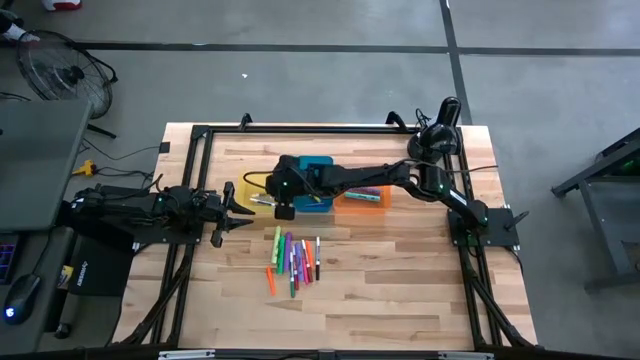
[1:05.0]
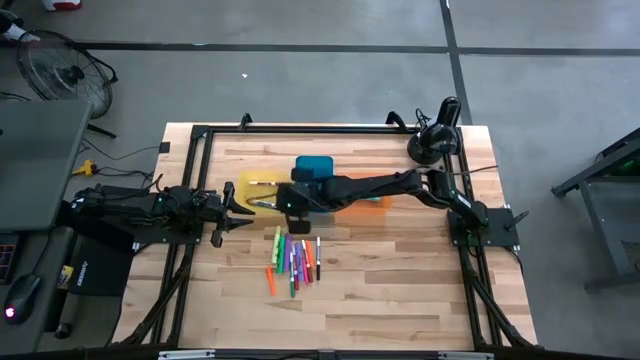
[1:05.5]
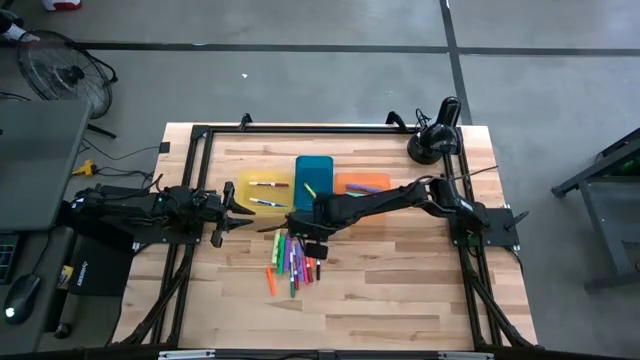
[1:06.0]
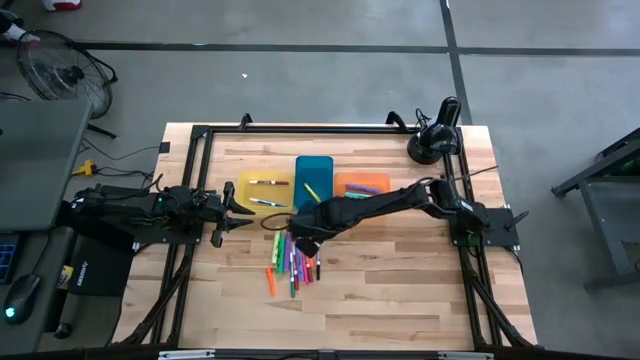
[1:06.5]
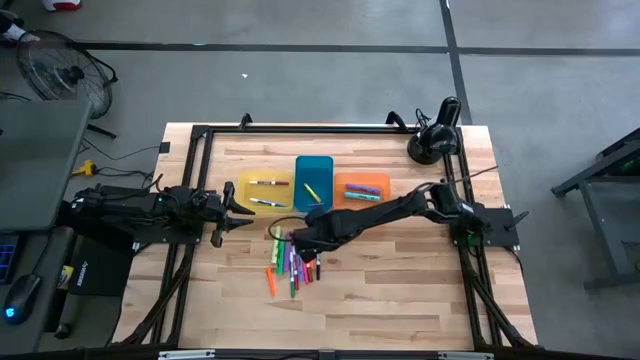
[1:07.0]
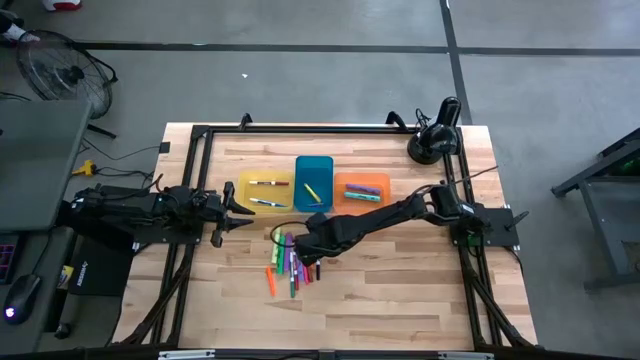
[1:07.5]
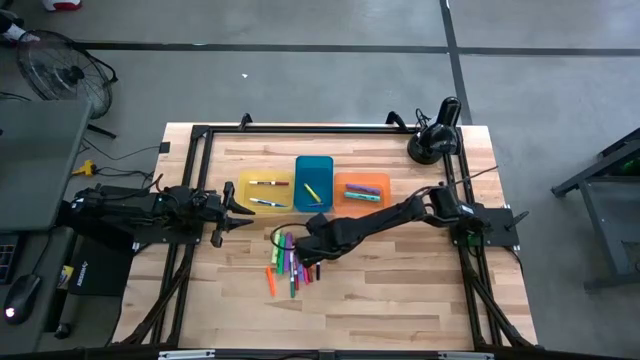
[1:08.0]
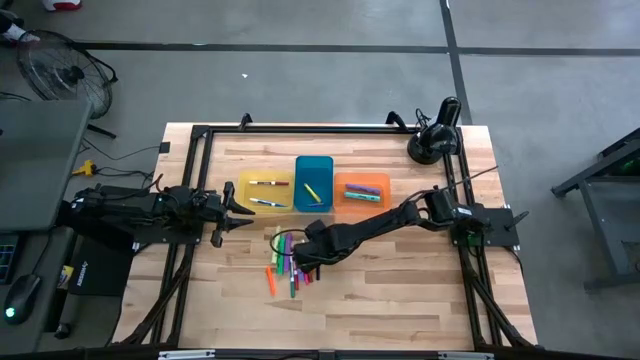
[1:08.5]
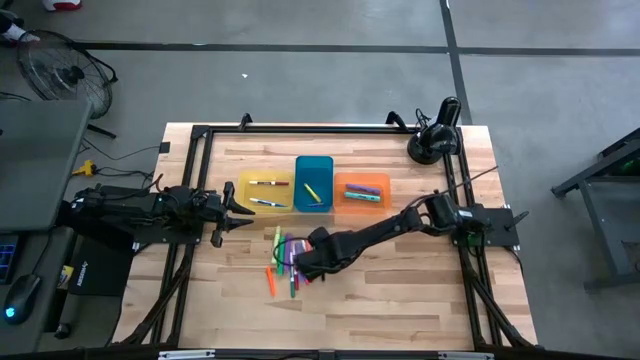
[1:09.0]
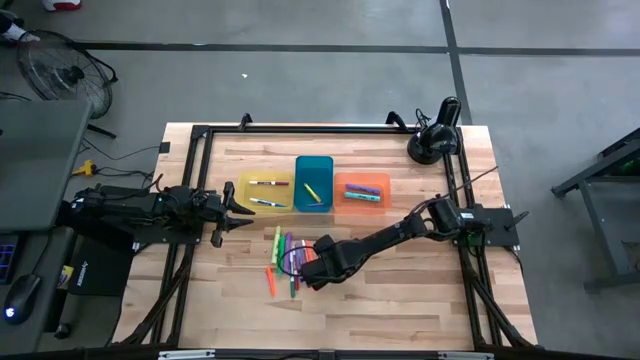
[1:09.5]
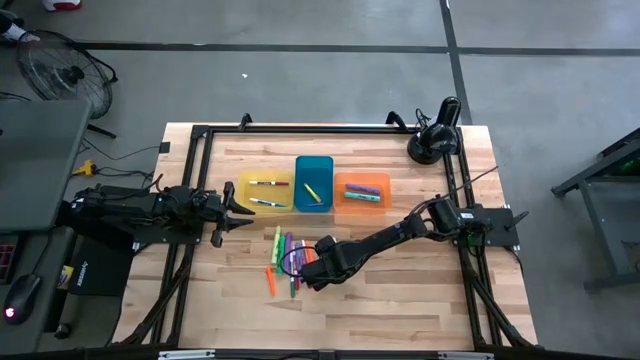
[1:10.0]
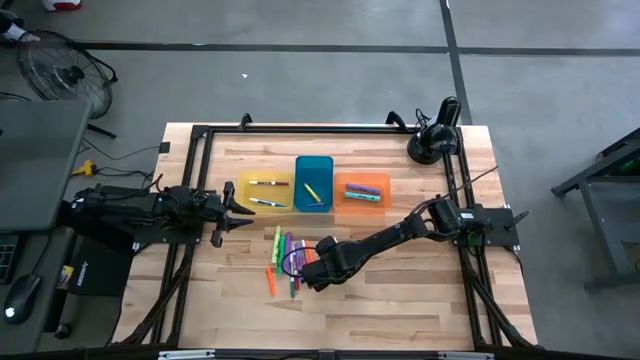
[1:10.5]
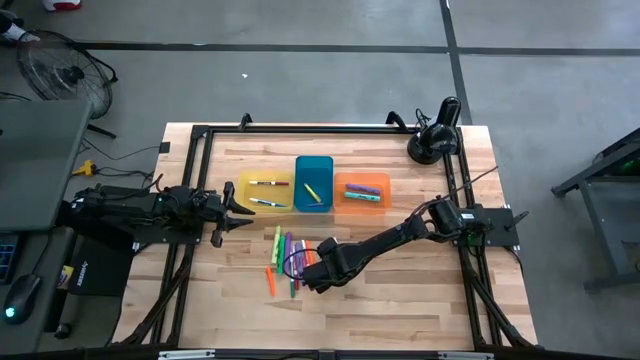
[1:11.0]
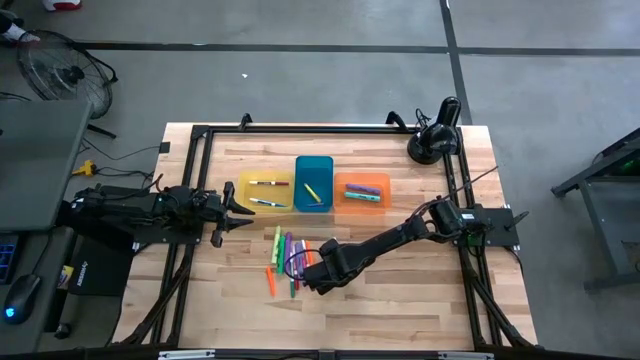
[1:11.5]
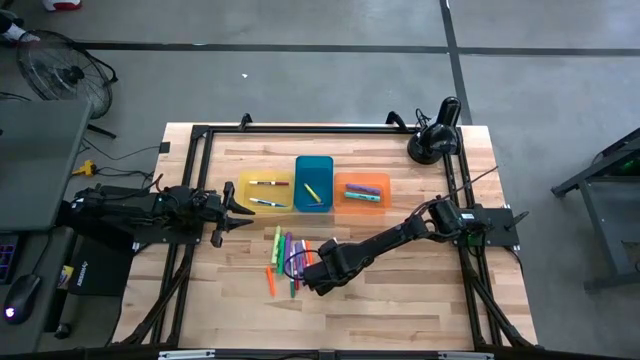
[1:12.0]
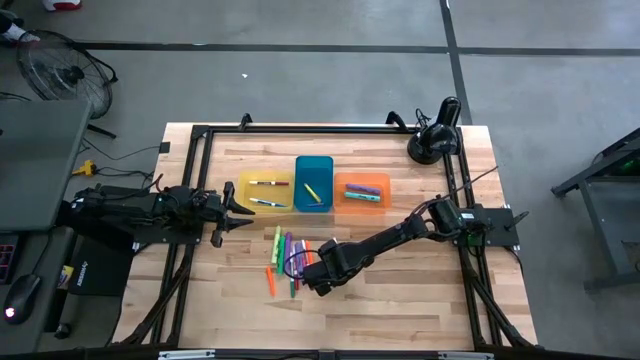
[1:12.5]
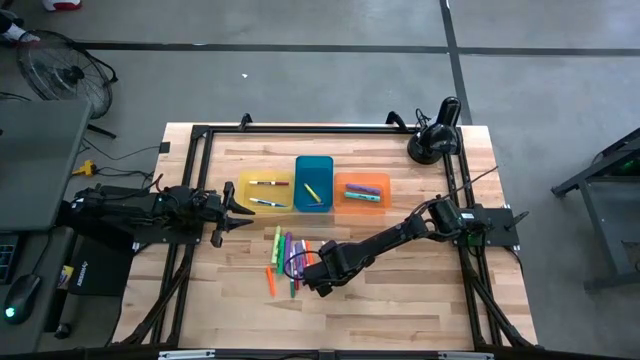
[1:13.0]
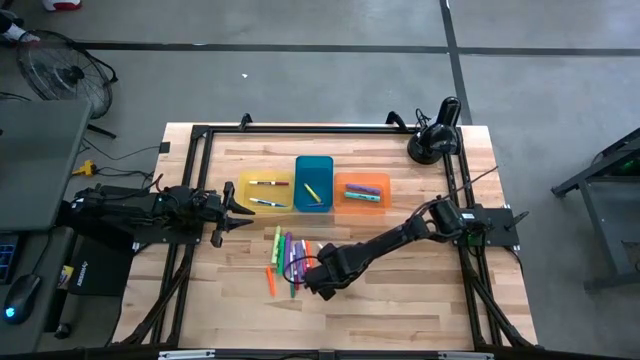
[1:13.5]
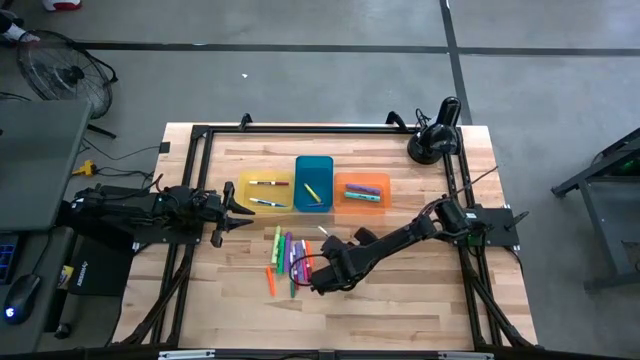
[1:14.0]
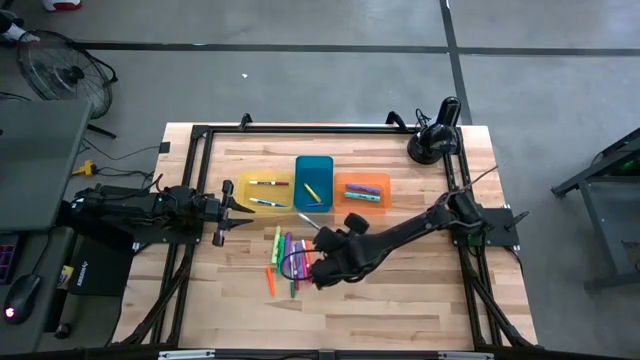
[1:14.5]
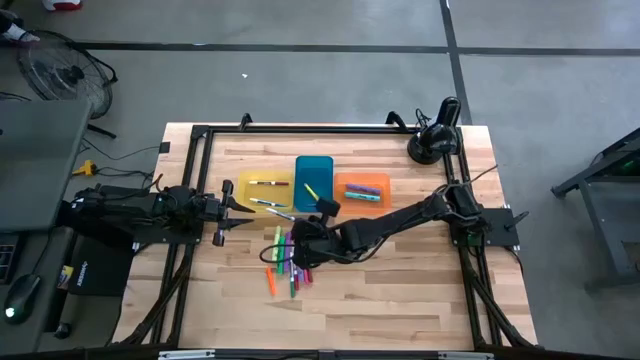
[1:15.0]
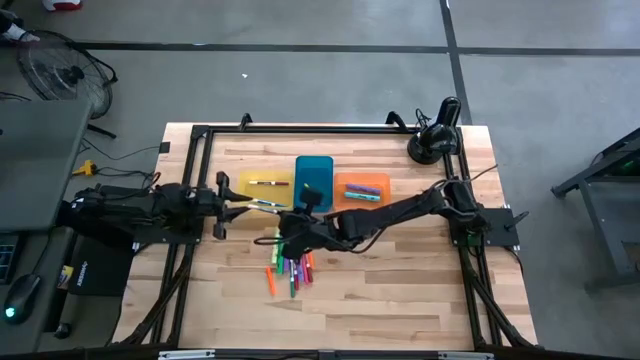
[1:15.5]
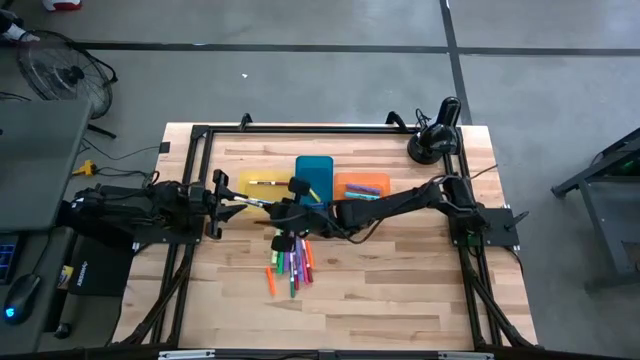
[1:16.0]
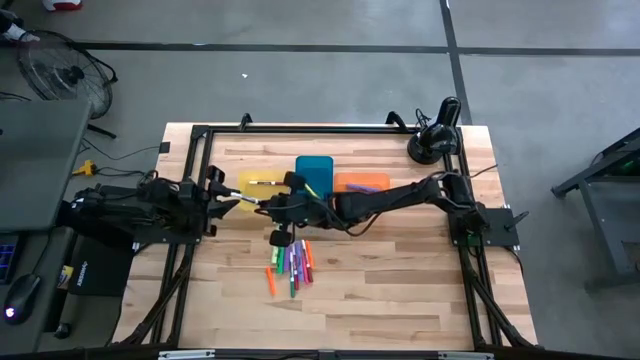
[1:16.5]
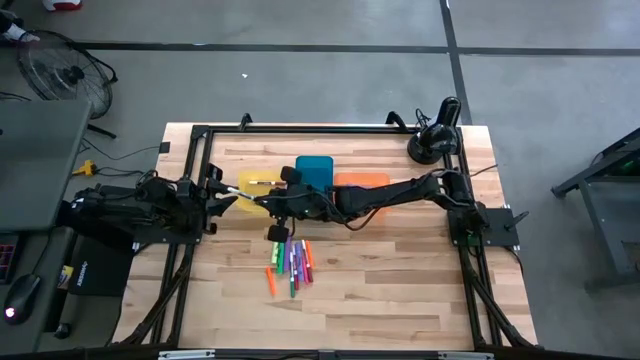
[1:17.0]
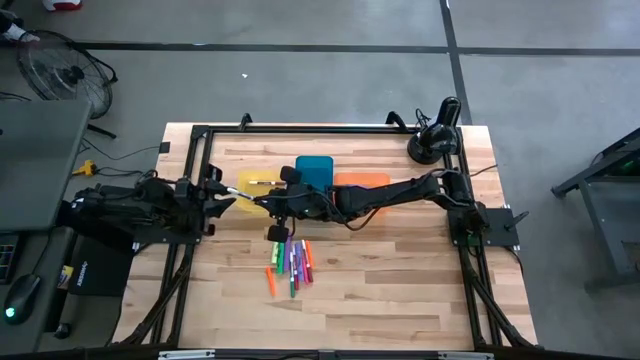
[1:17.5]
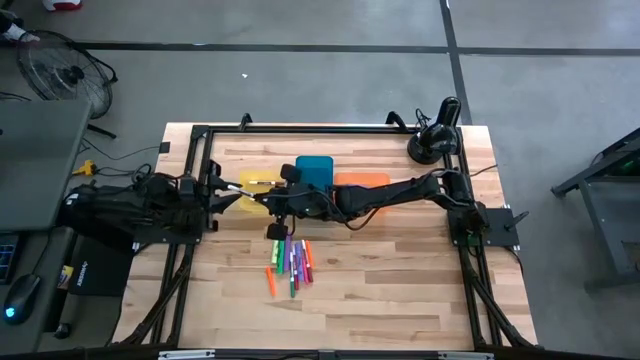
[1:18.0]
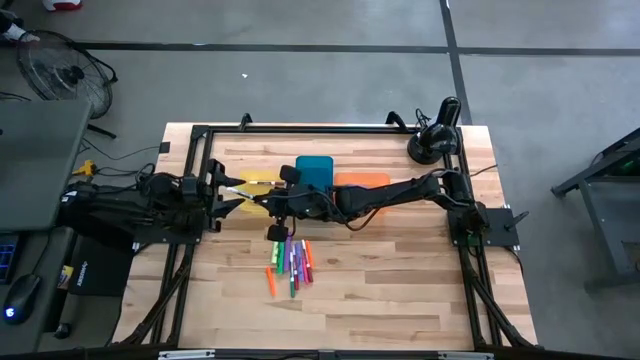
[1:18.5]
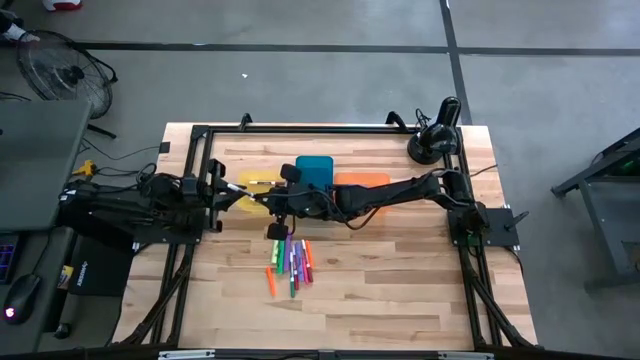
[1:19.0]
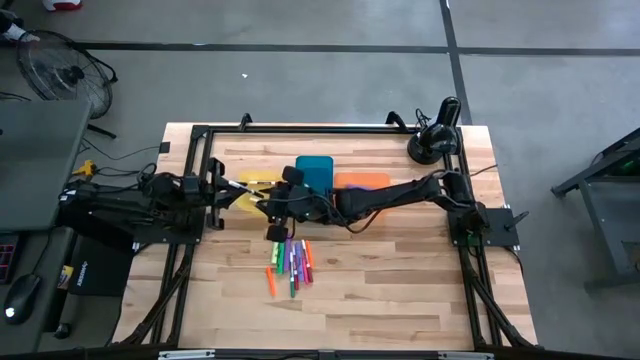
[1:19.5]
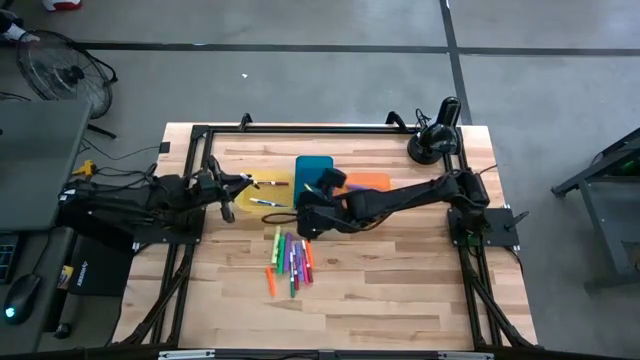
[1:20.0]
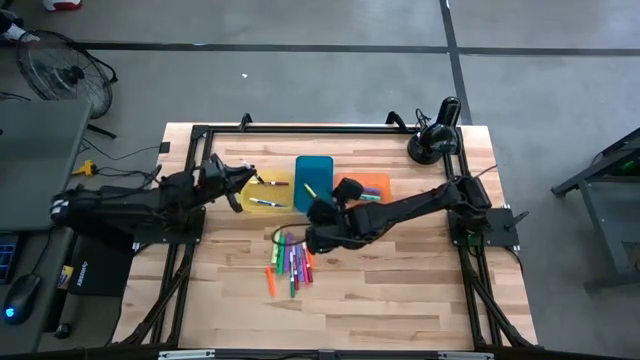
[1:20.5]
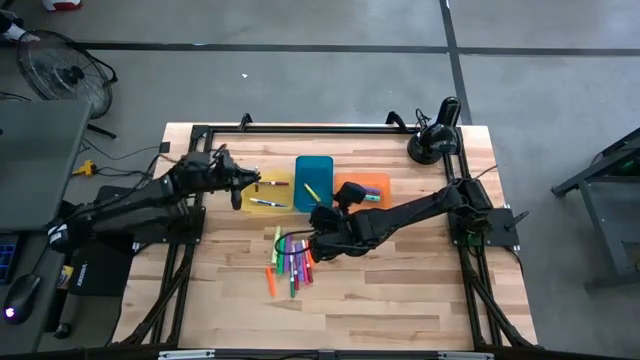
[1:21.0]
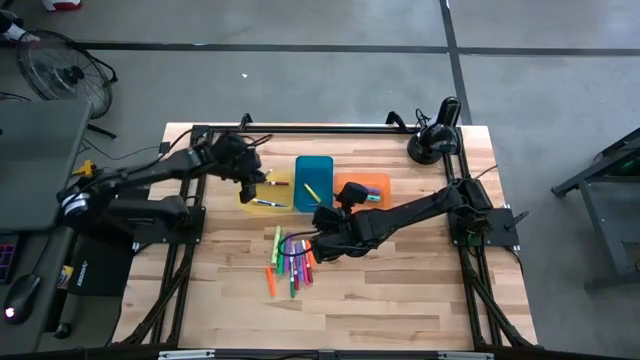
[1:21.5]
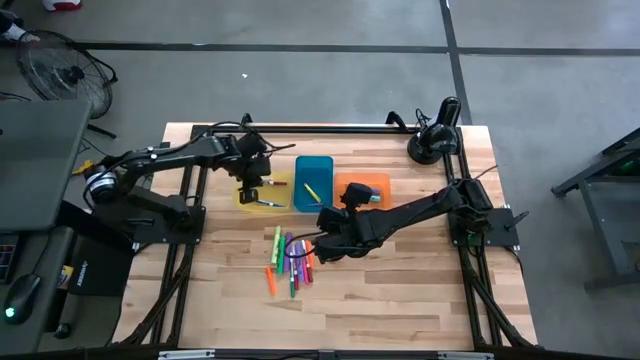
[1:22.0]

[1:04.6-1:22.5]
Task: Pick & Place Markers
Put the black dry erase marker into the yellow bin

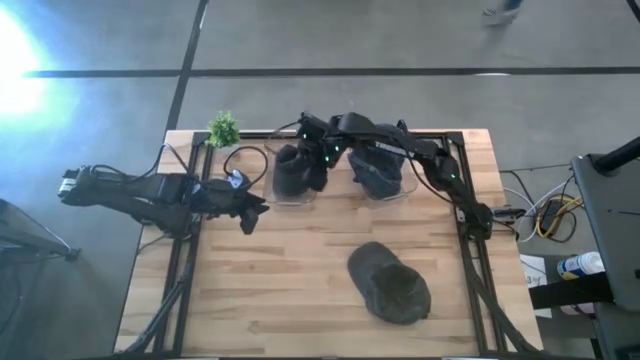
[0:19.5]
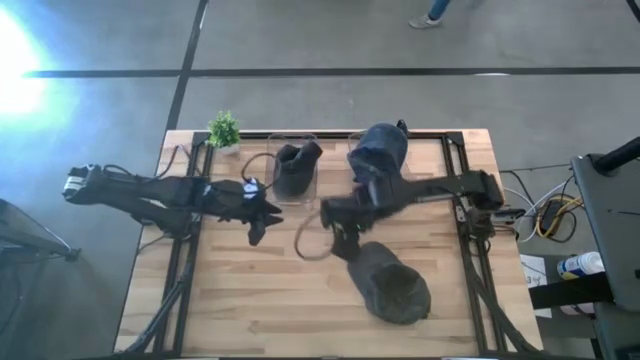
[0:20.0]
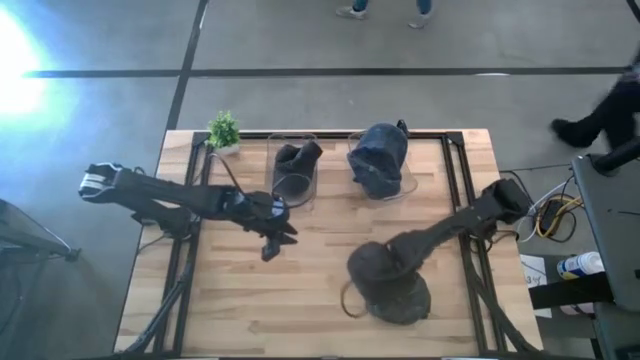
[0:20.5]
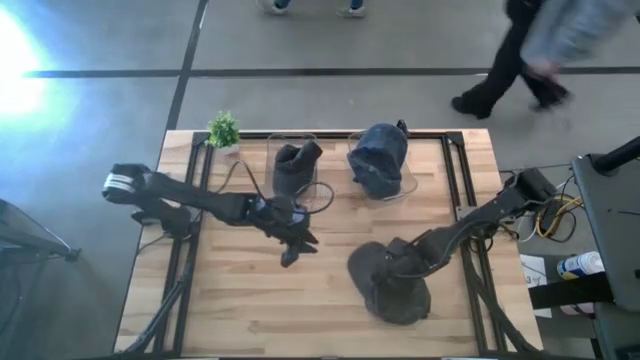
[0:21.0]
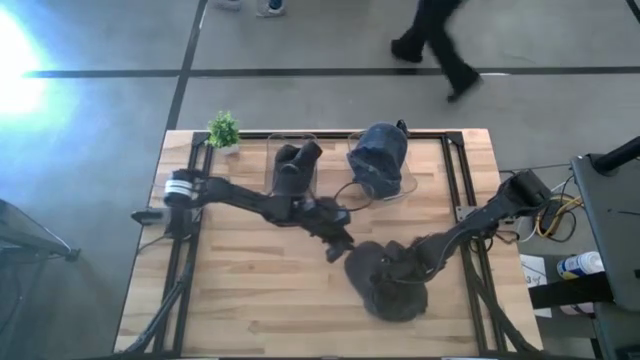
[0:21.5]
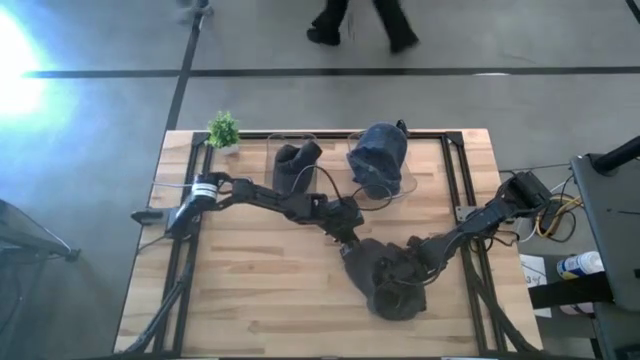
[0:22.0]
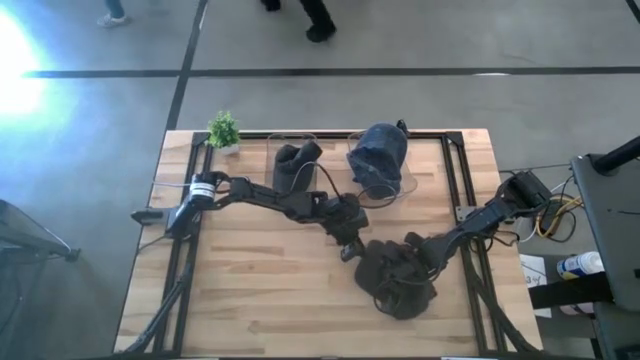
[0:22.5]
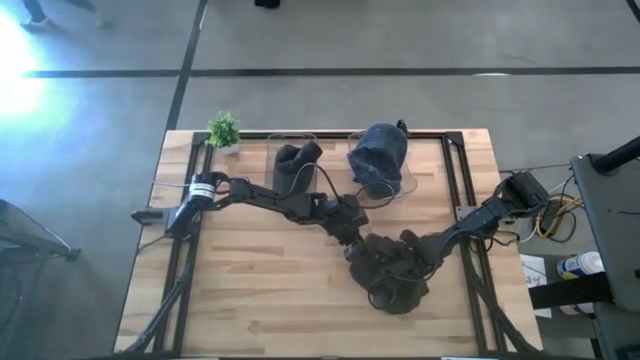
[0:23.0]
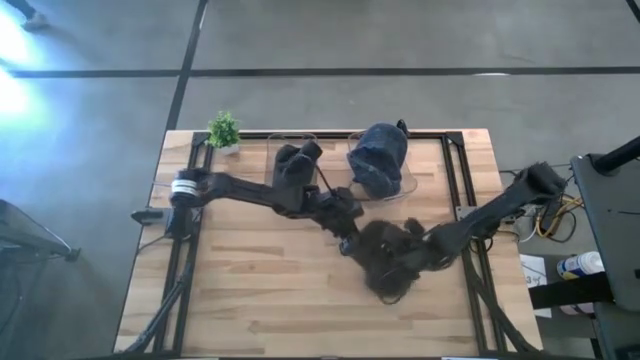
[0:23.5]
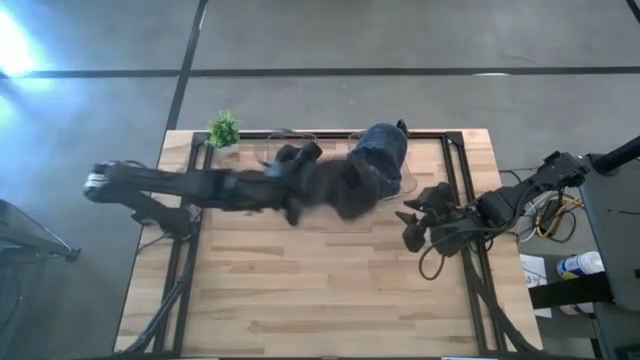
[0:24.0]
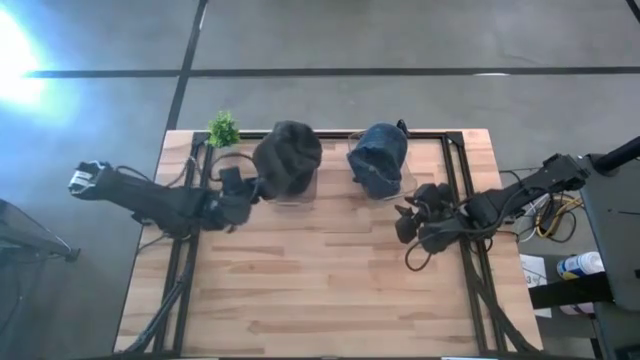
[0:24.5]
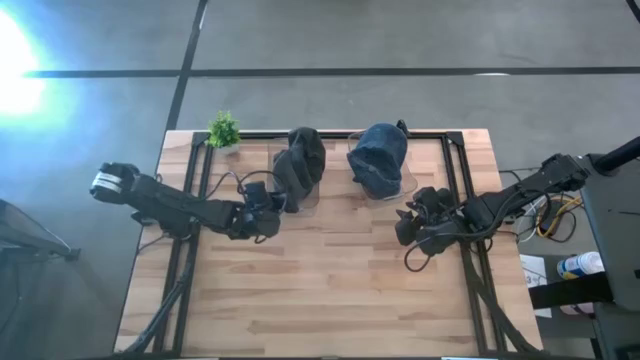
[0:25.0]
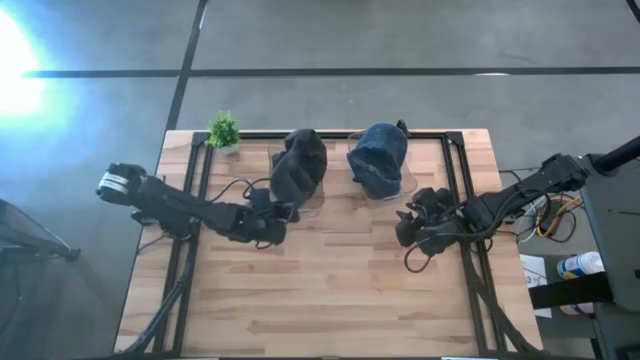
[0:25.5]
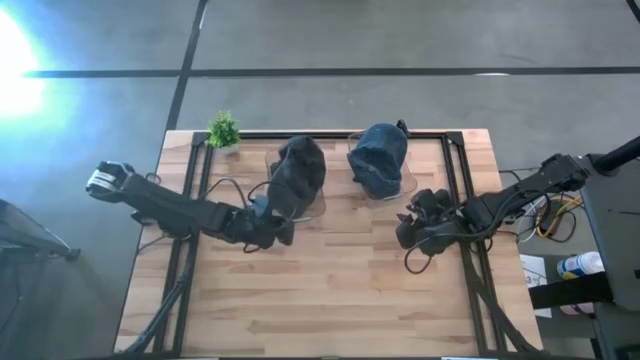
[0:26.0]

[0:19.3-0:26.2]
Task: Pick & Place hat
Put the black cap into the left transparent bin
